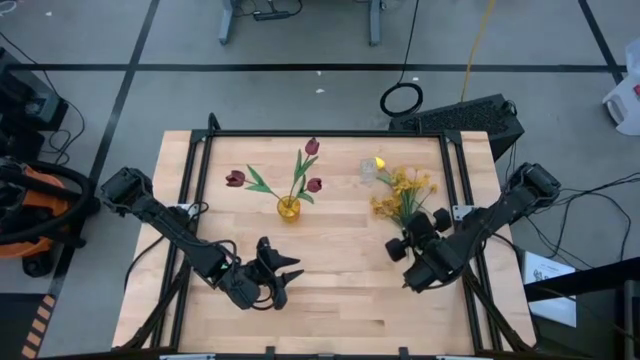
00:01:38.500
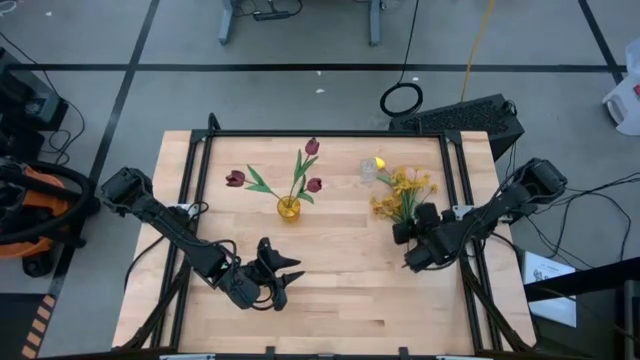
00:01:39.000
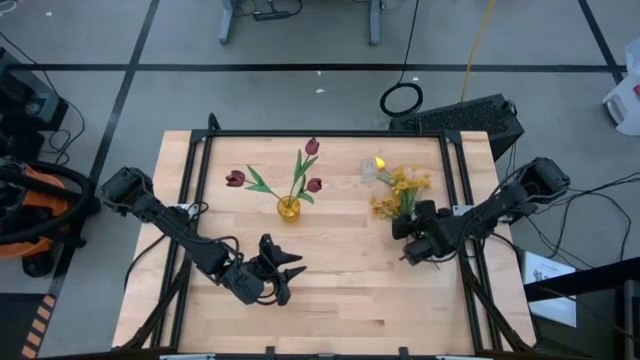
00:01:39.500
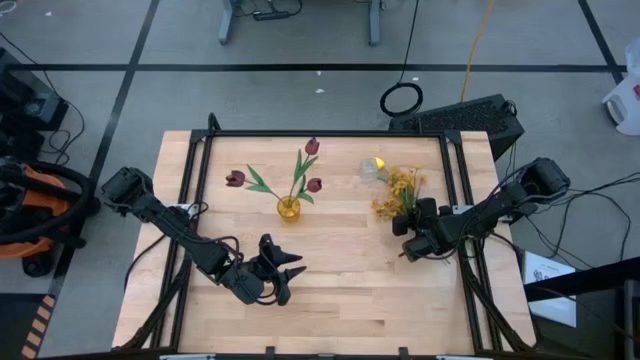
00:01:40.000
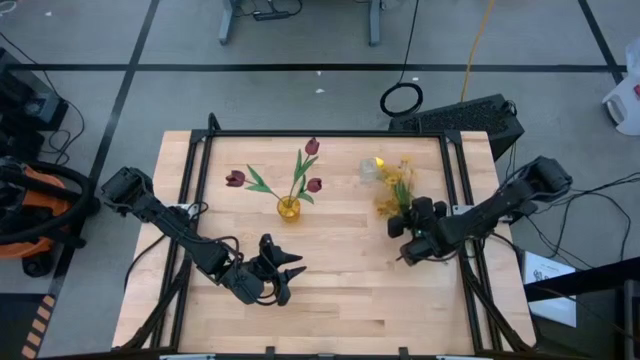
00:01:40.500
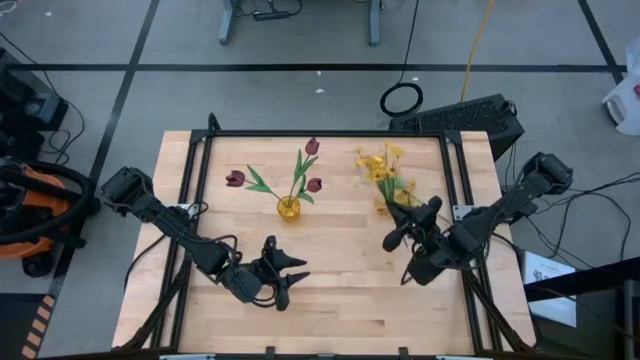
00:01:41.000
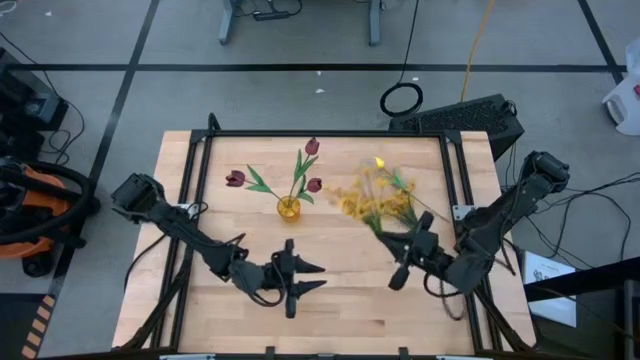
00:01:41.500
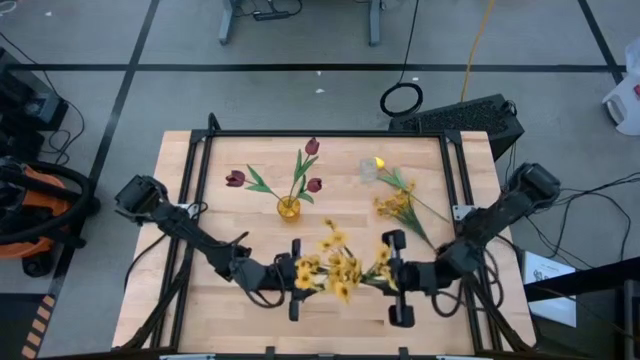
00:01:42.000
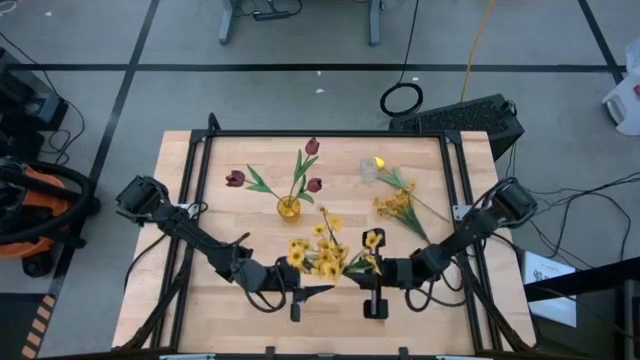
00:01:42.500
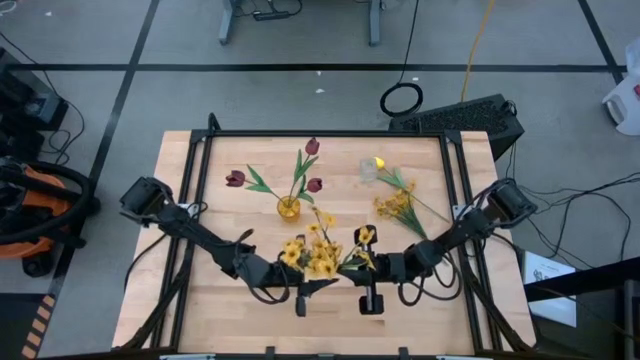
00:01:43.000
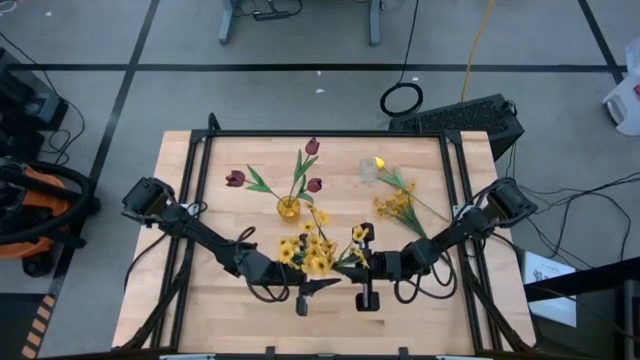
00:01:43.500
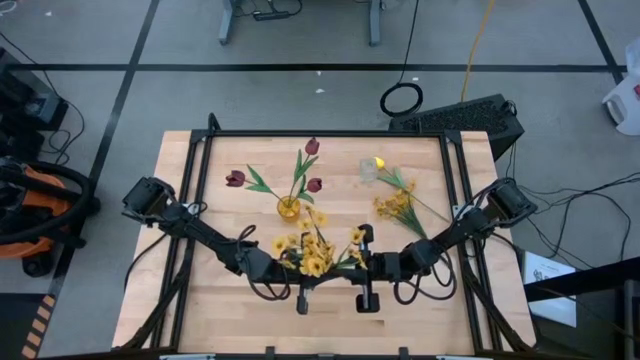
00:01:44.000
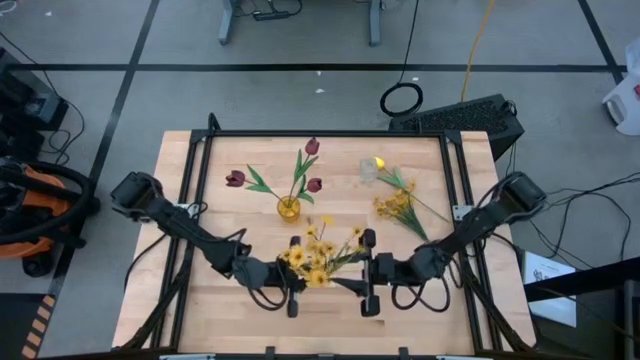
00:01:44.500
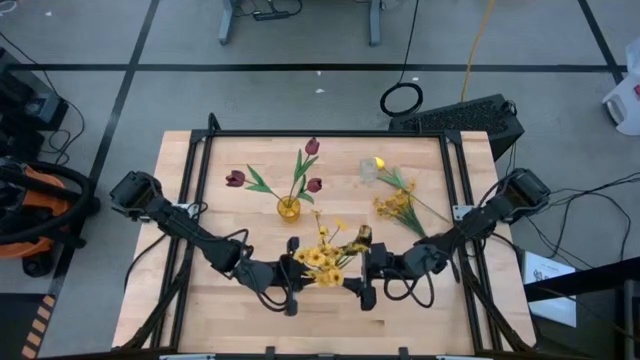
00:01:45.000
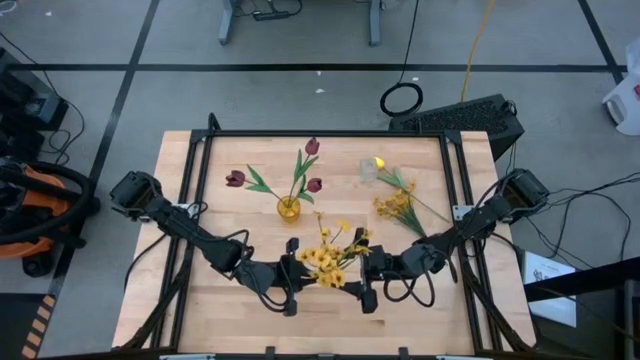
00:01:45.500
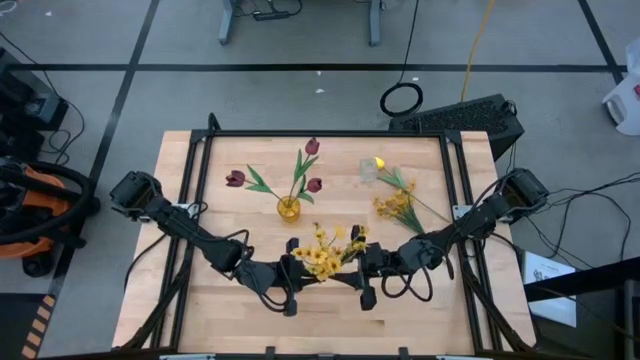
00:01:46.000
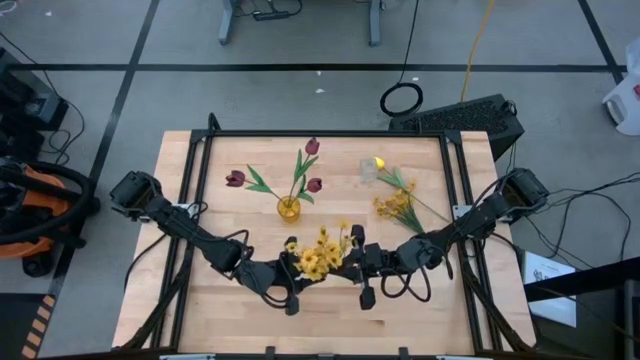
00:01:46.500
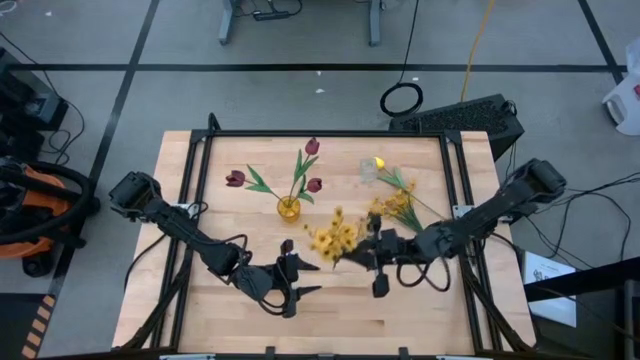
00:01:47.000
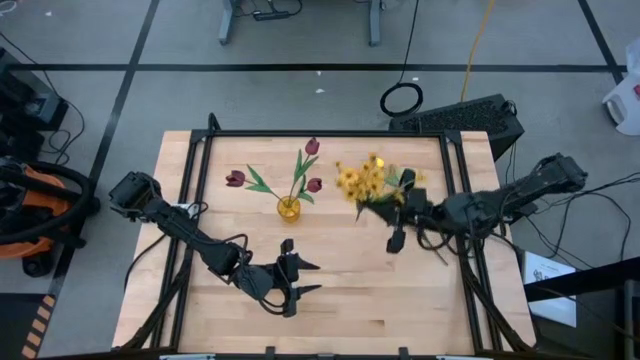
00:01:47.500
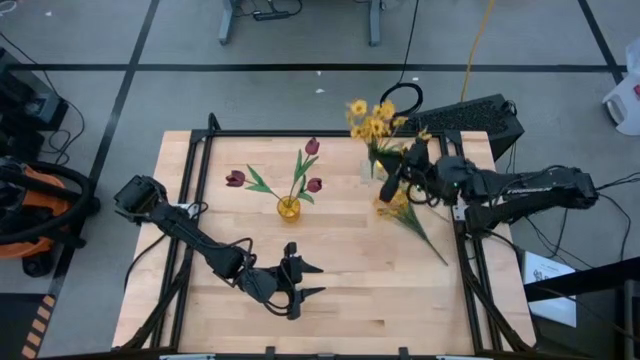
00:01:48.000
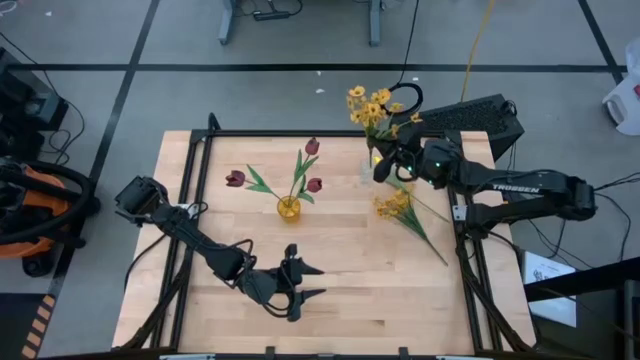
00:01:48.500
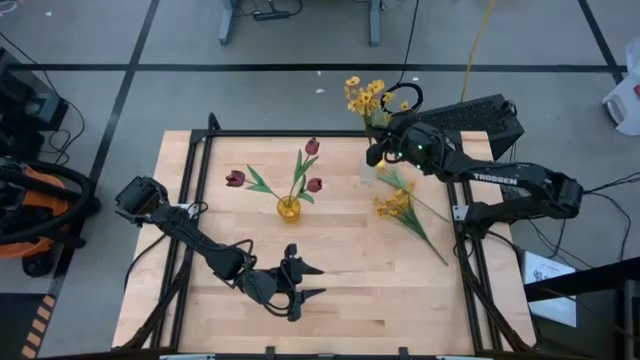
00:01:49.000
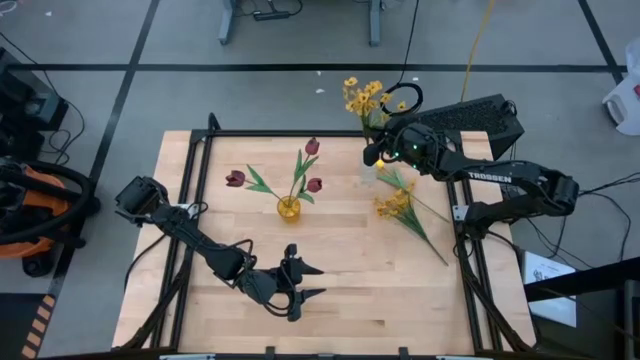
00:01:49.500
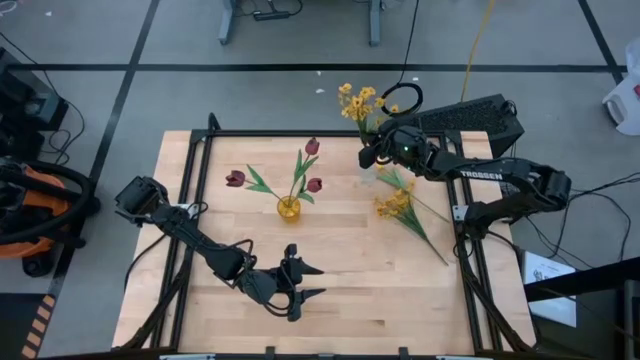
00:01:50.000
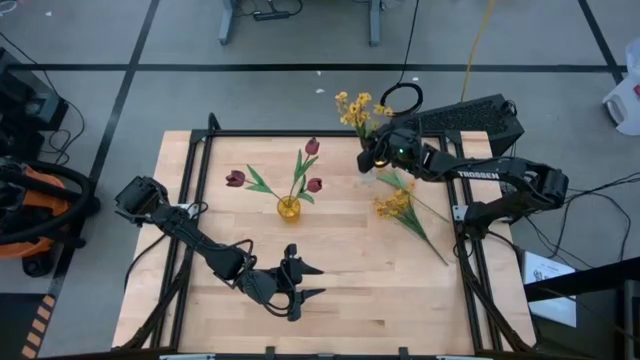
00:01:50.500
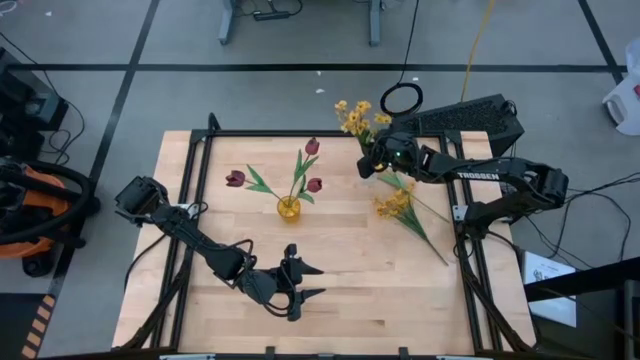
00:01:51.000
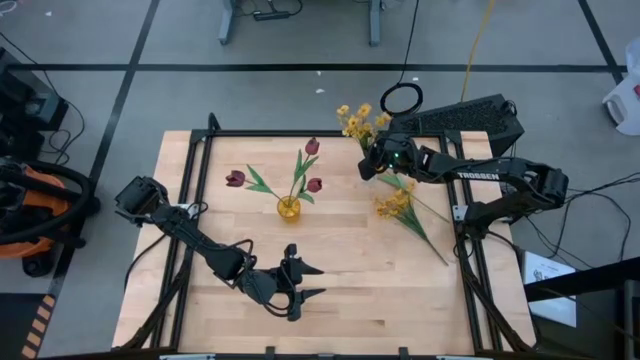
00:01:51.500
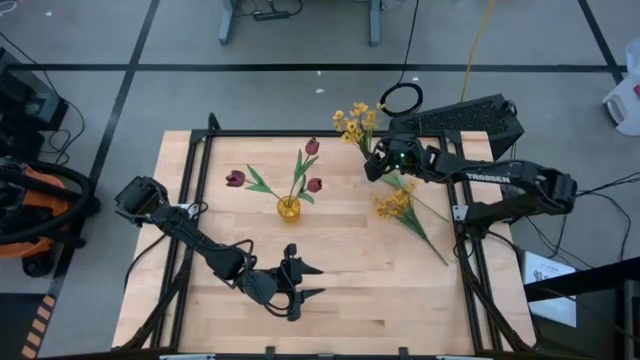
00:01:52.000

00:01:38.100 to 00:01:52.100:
Task: Sort flowers into vase by color
Put the yellow flowers into the transparent vase

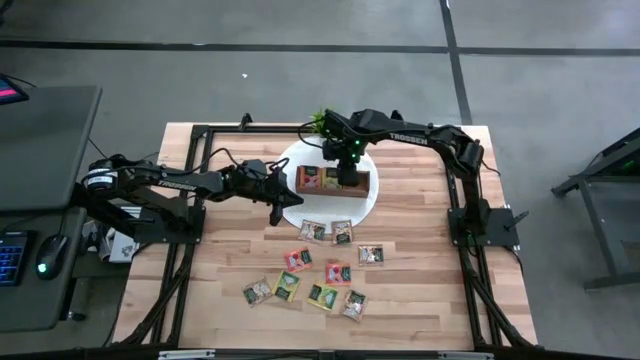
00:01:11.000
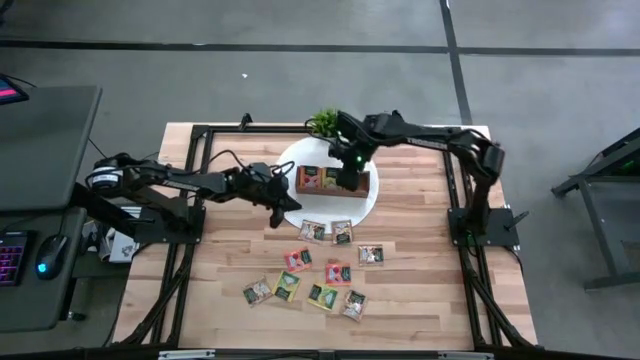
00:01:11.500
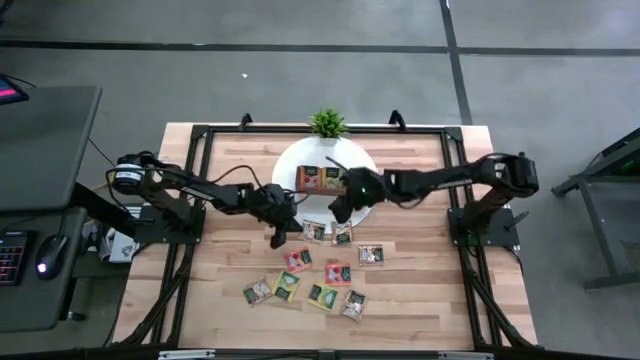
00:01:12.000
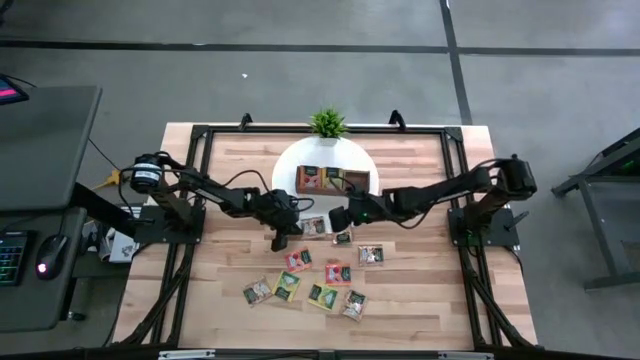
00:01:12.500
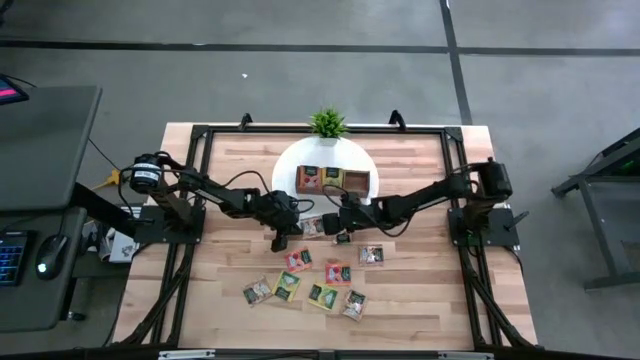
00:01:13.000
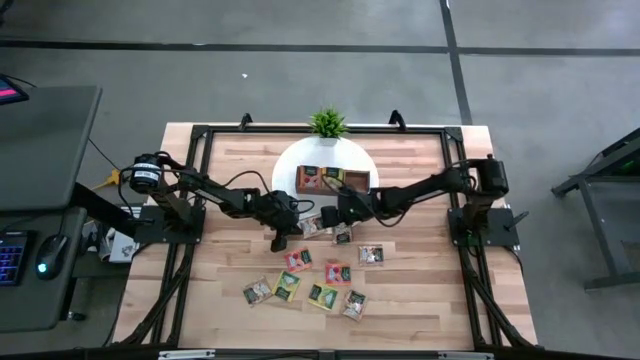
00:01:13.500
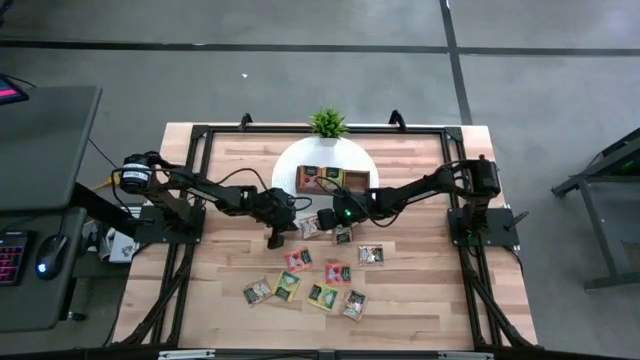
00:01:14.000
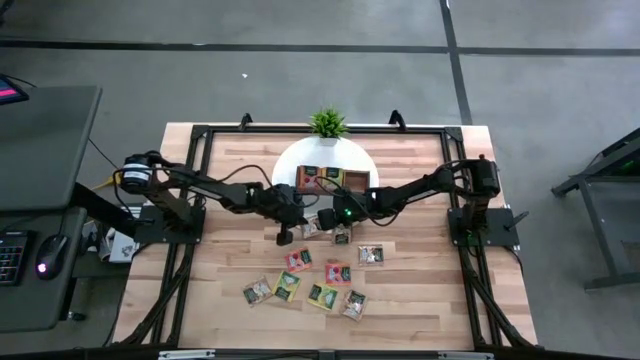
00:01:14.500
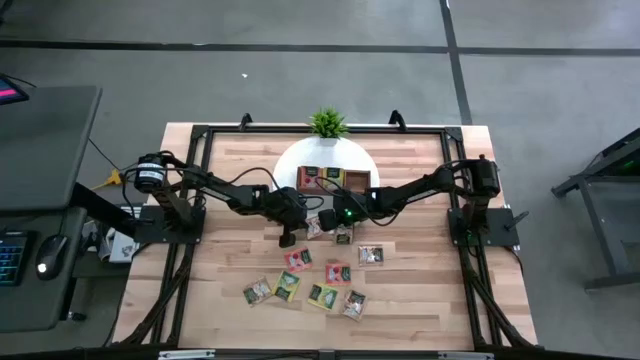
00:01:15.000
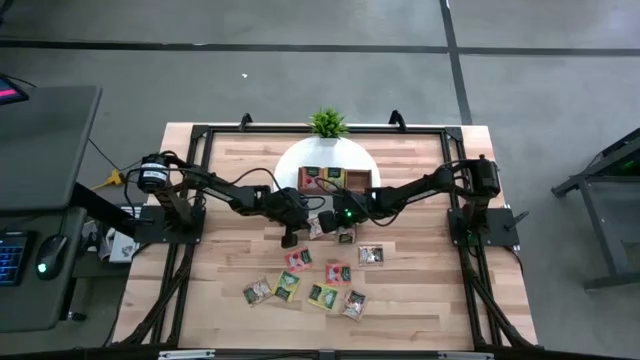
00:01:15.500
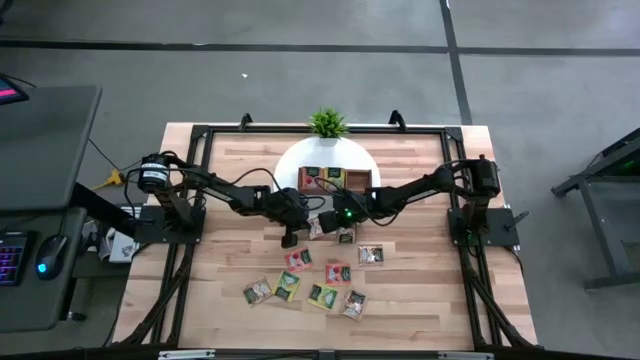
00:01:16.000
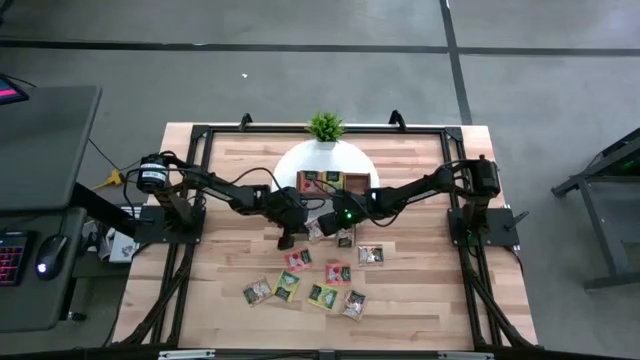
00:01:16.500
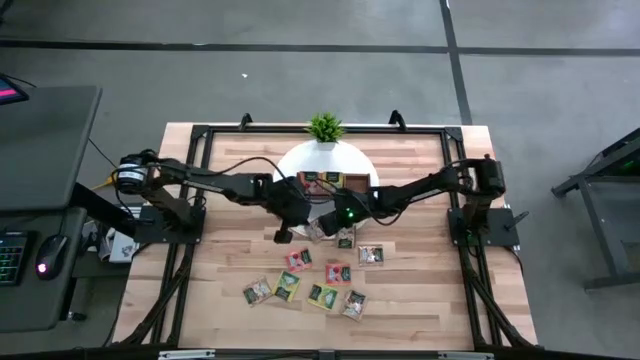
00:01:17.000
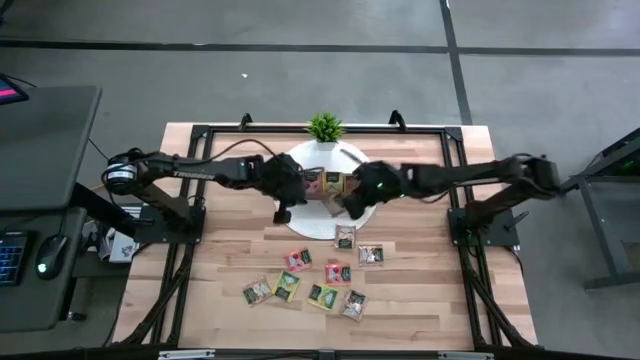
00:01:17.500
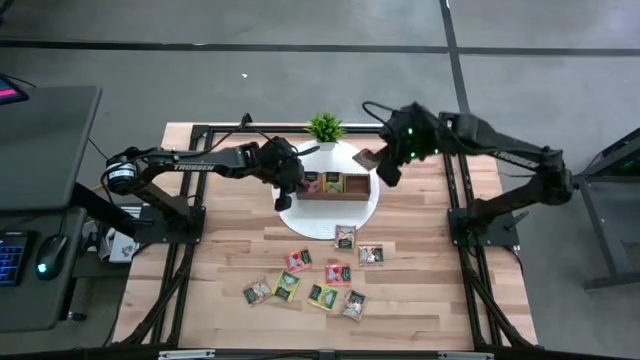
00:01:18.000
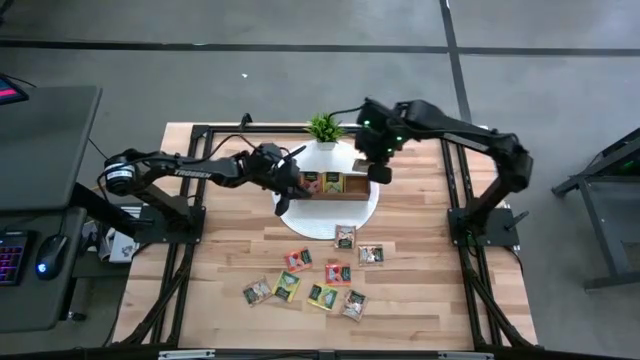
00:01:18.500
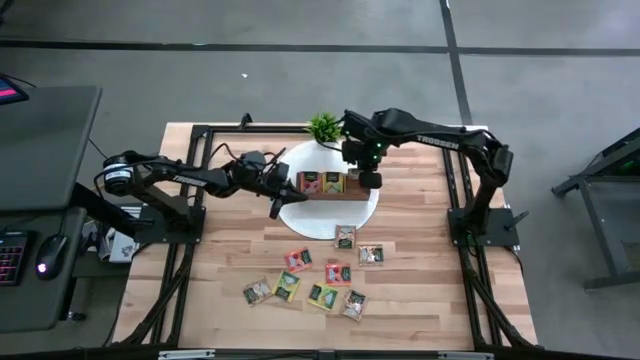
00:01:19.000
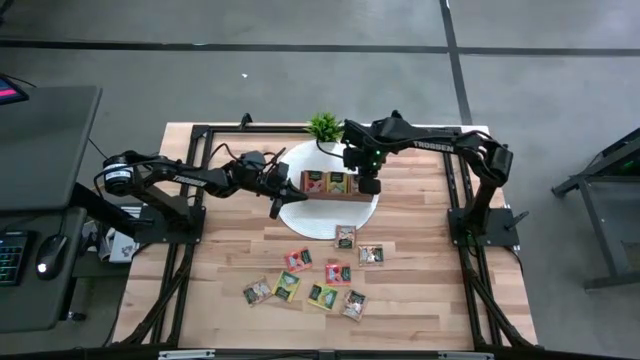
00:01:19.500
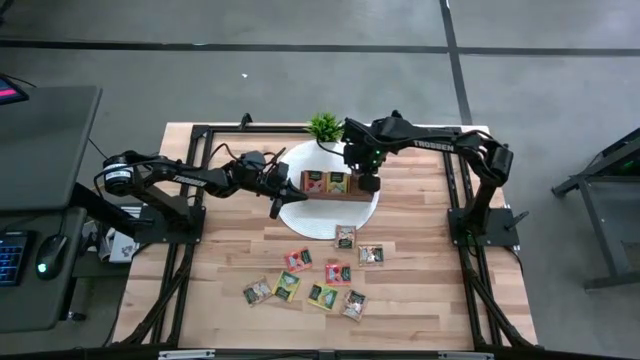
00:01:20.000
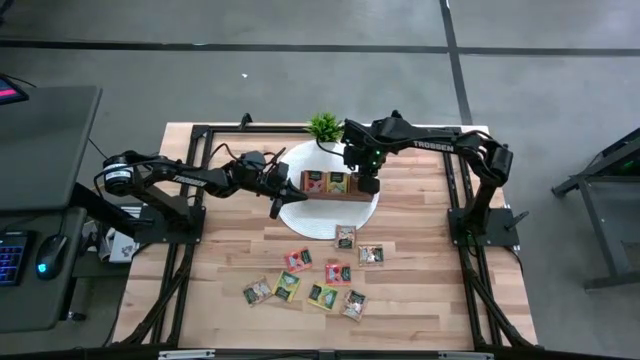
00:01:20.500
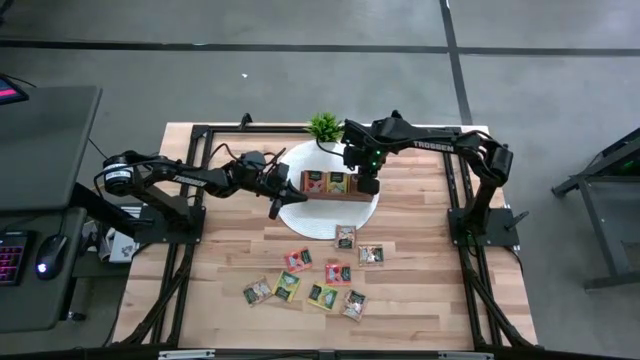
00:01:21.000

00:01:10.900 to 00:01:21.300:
Task: Pick & Place Tea
Put the brown tea bag into the right section of the wooden organizer
